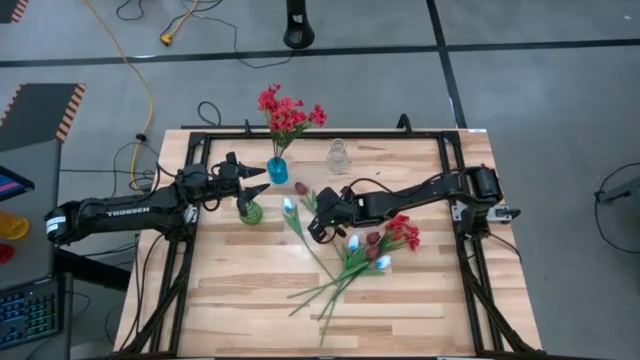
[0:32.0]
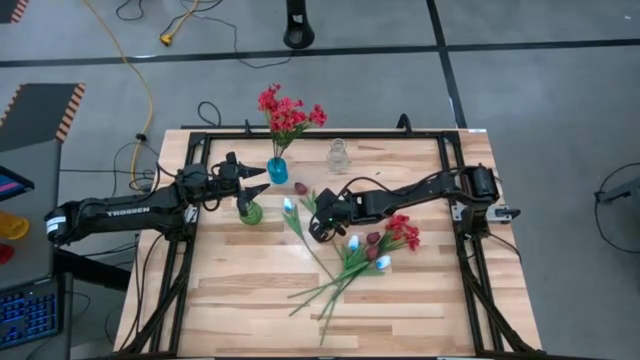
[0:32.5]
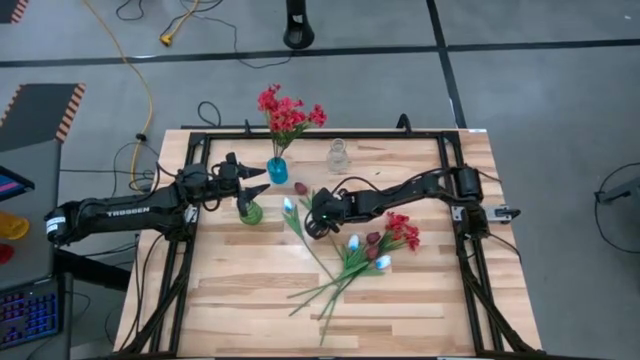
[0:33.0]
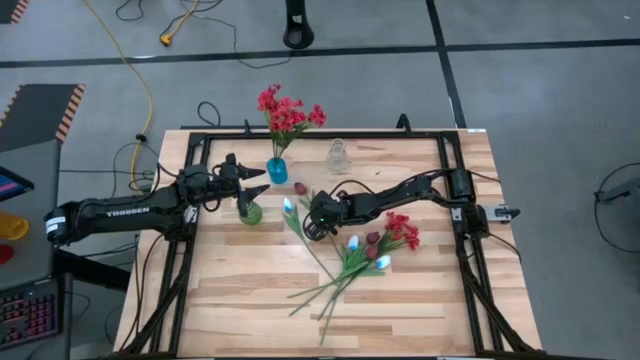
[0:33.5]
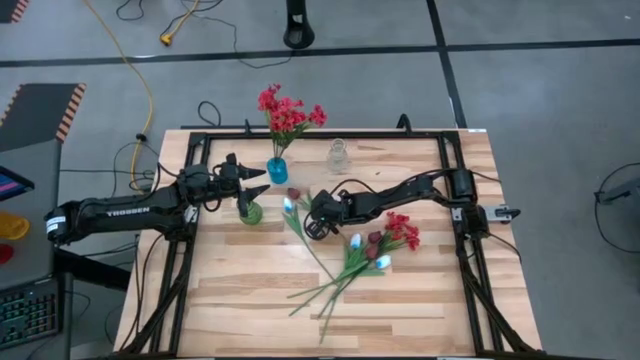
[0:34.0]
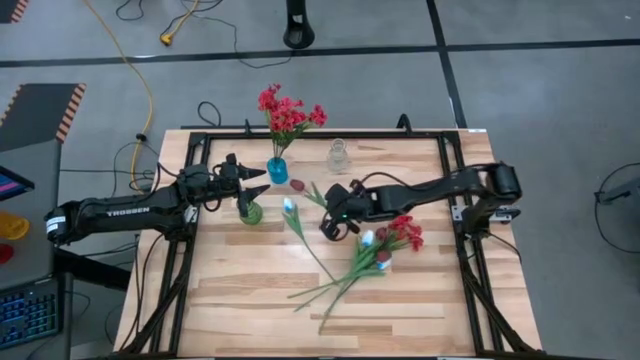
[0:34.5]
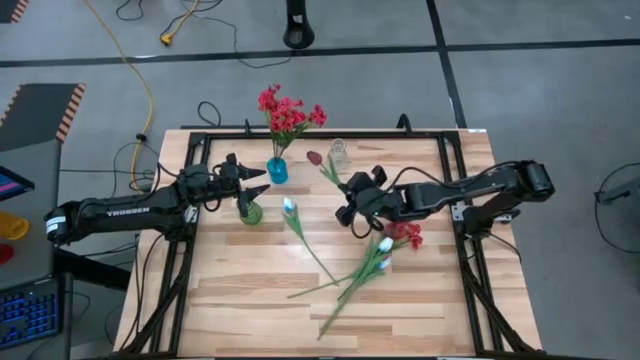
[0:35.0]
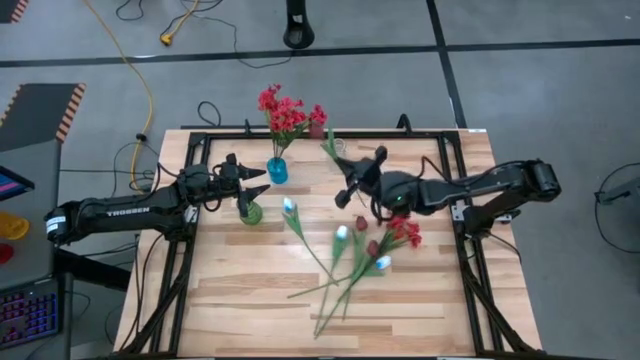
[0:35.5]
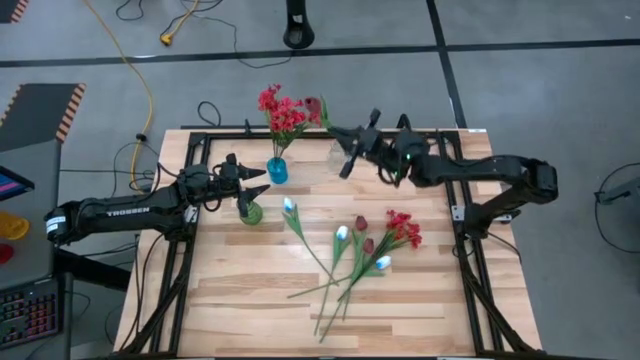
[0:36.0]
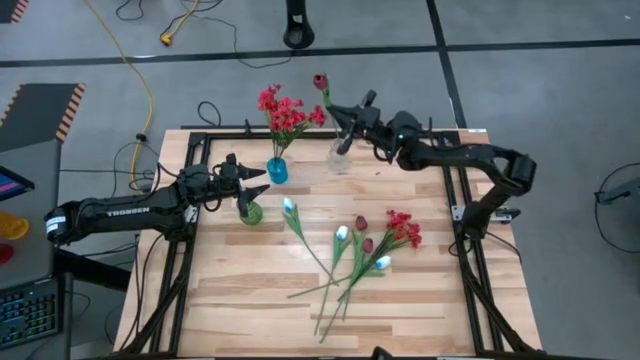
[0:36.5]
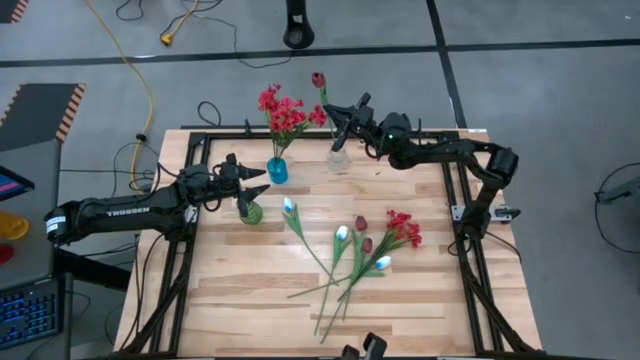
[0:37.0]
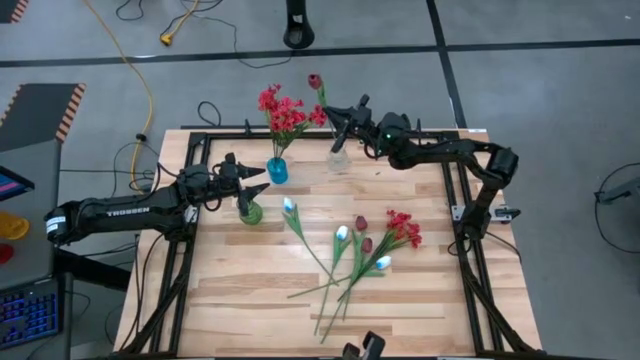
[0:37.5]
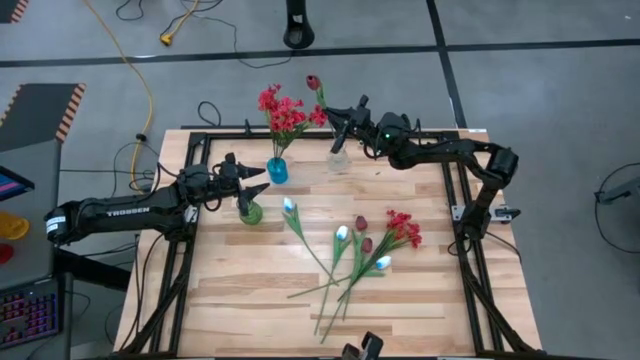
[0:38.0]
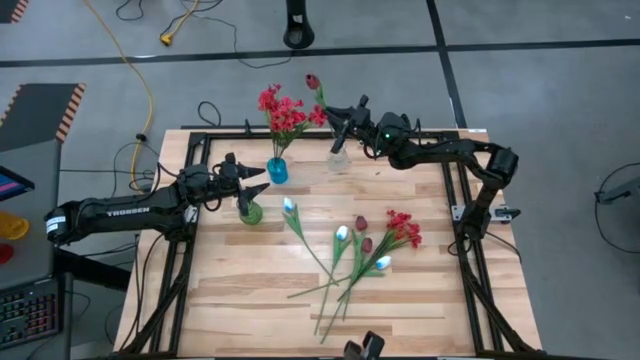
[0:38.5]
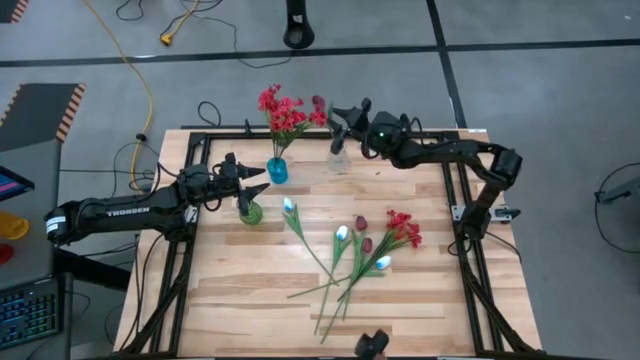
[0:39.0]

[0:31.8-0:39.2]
Task: Sort flowers into vase by color
Put the top red tulip into the transparent vase

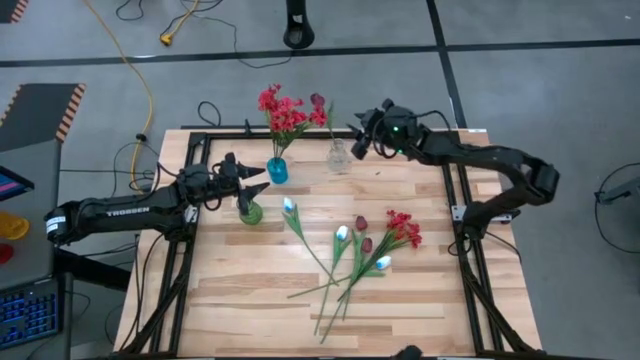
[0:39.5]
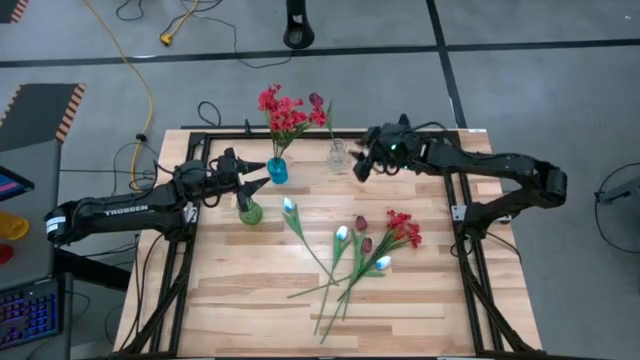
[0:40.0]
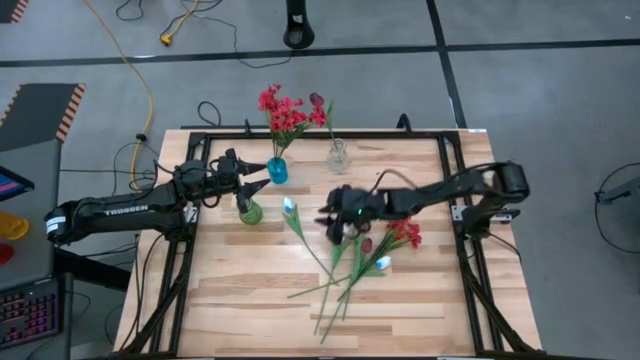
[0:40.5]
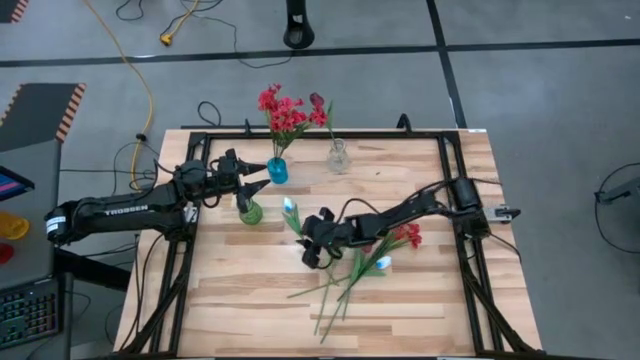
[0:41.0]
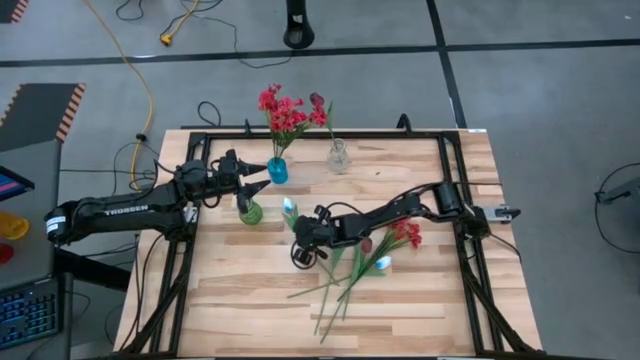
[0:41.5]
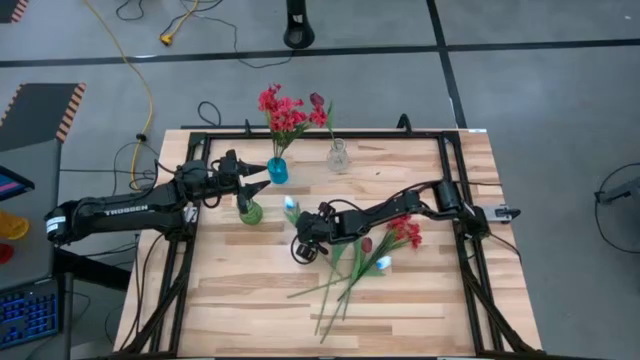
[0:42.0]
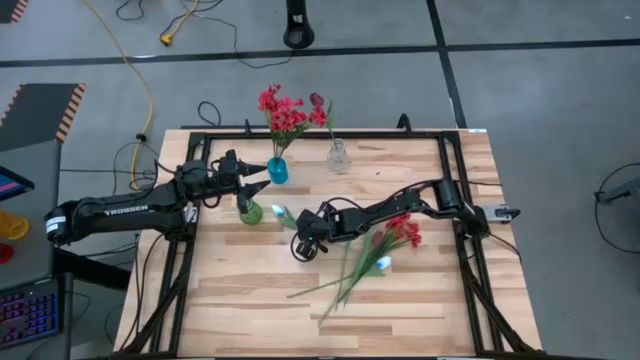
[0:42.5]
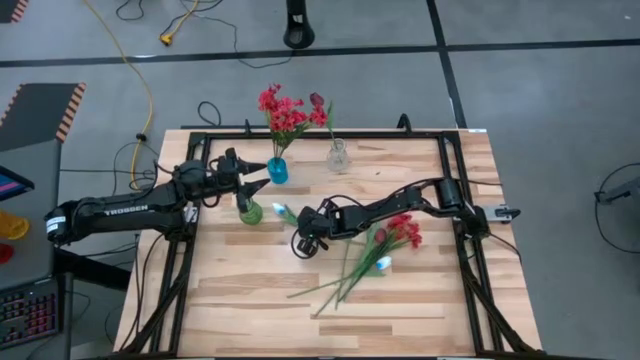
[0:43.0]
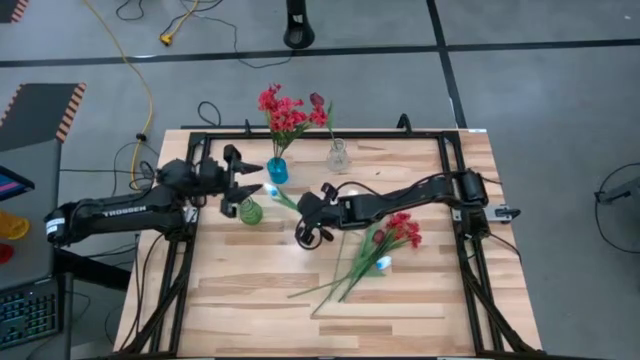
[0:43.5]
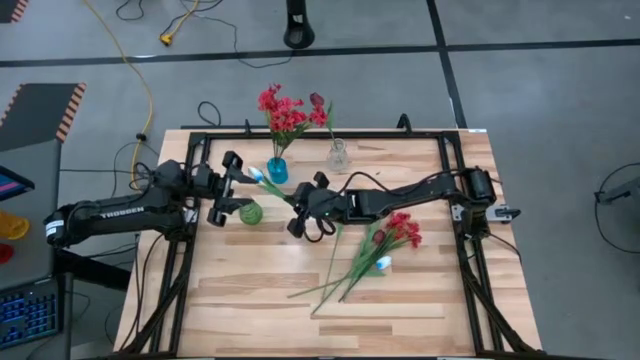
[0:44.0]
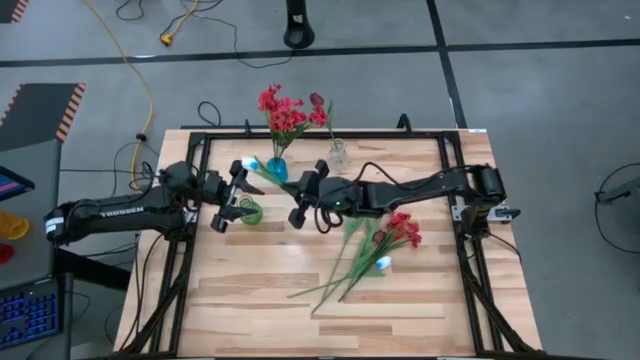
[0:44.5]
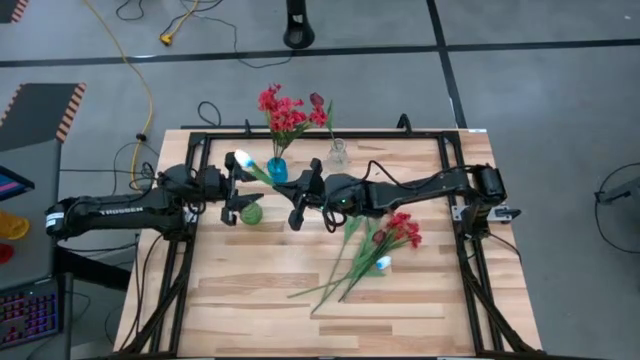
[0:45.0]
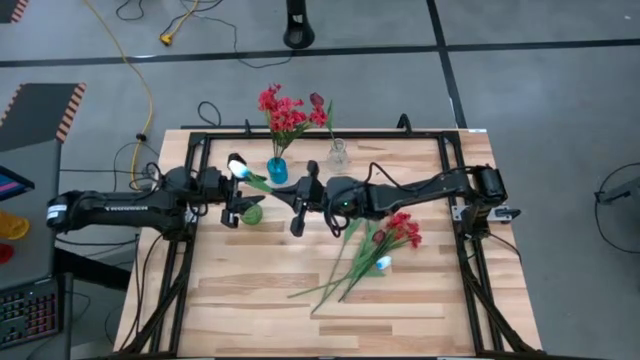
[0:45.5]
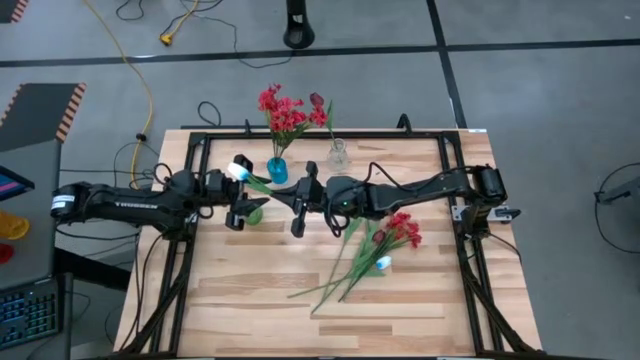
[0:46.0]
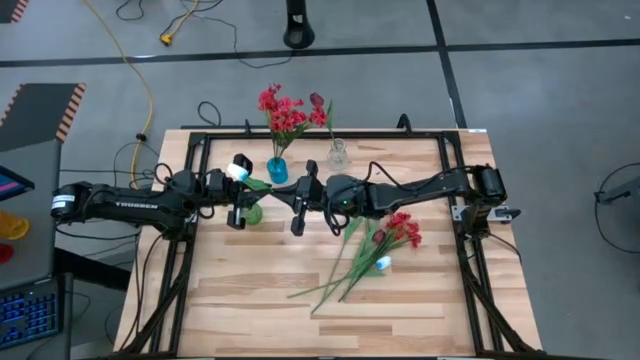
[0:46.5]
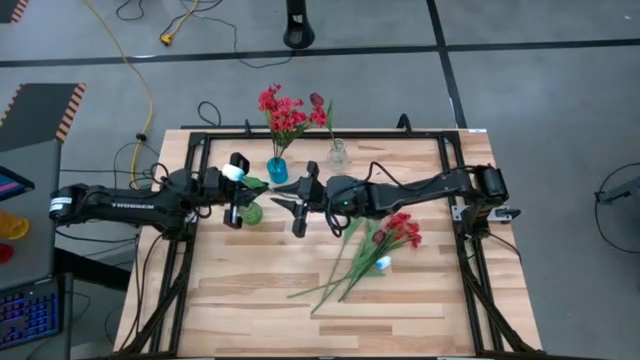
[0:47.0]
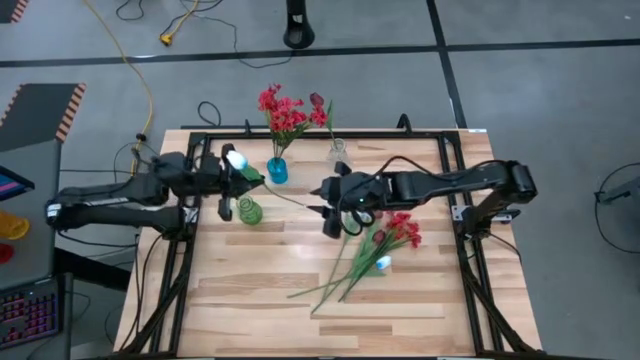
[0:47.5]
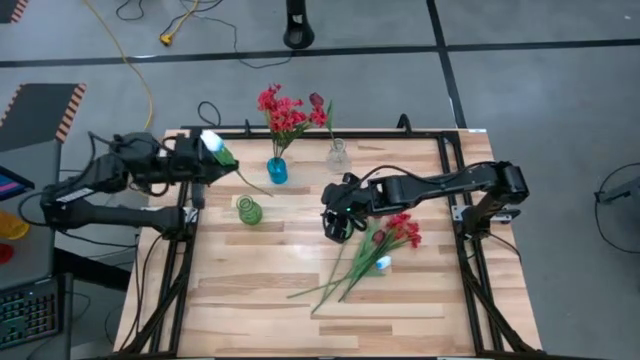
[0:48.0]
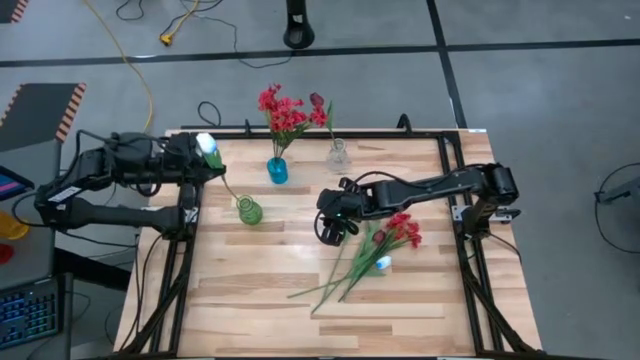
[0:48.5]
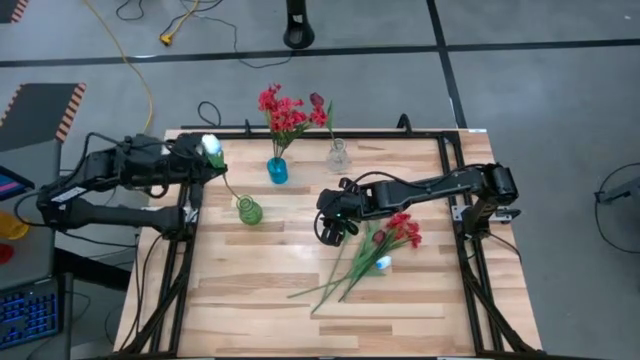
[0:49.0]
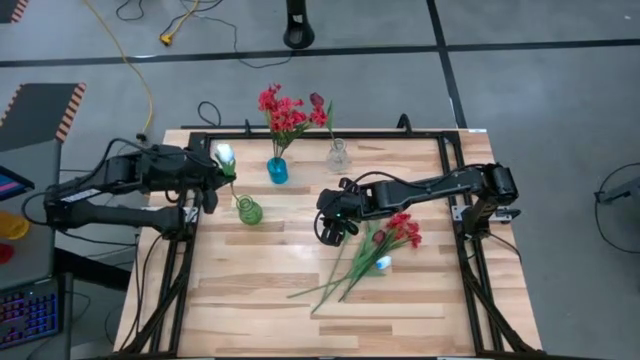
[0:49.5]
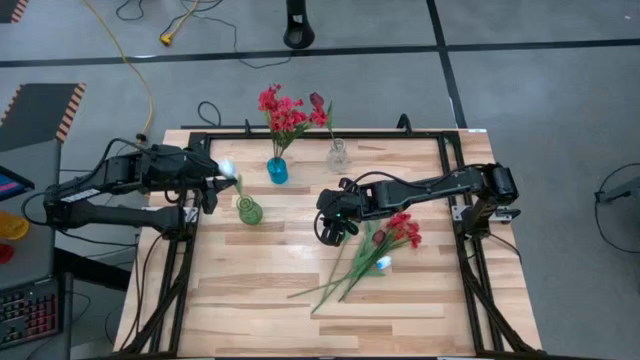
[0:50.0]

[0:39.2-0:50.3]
Put the top white tulip into the green vase

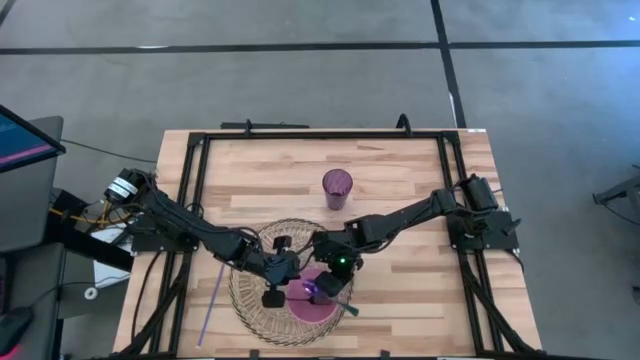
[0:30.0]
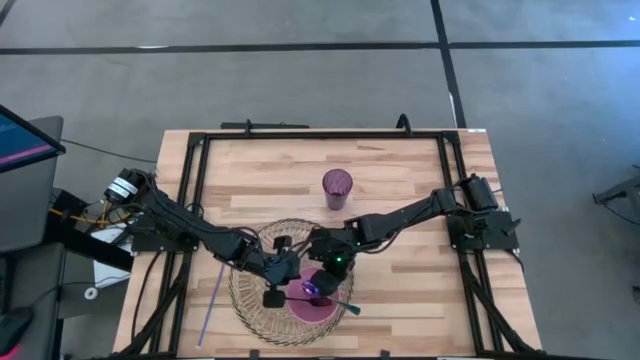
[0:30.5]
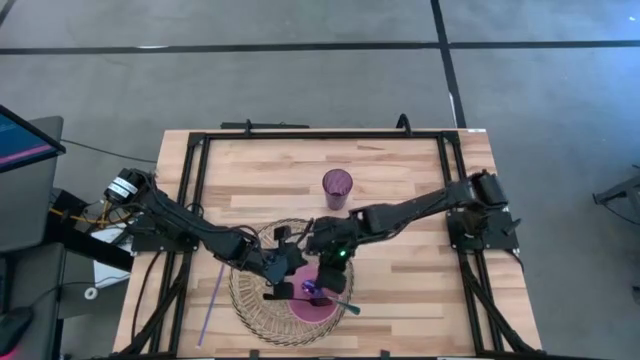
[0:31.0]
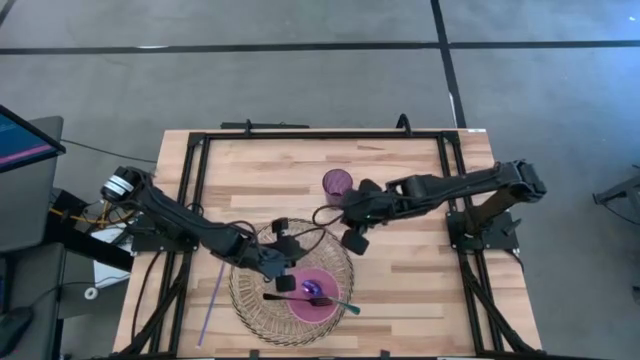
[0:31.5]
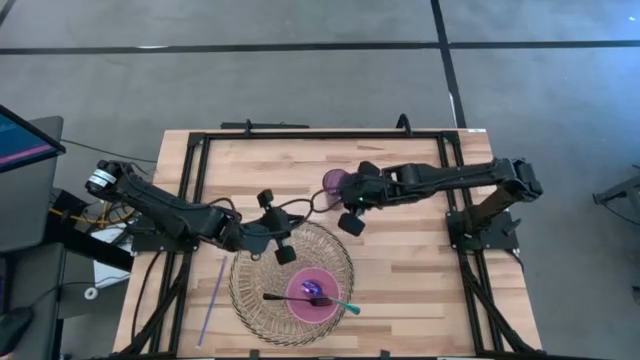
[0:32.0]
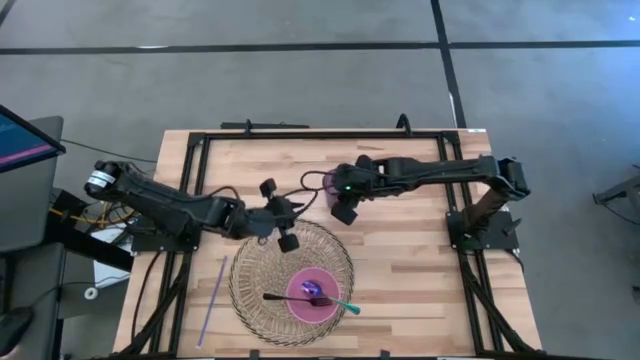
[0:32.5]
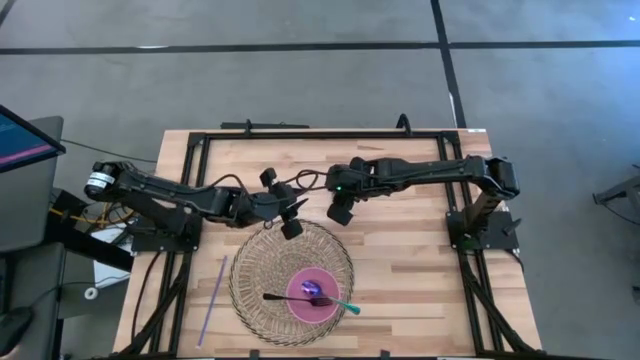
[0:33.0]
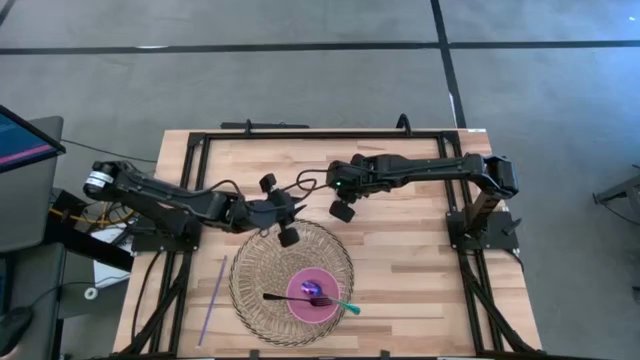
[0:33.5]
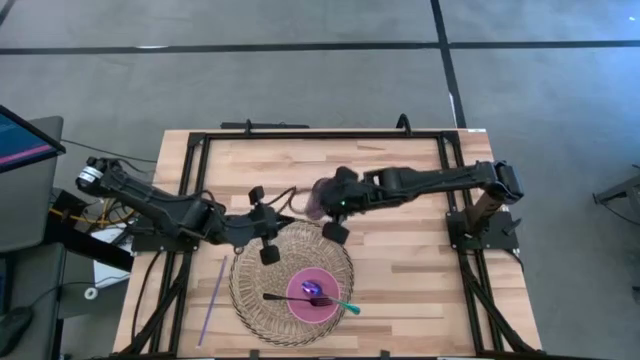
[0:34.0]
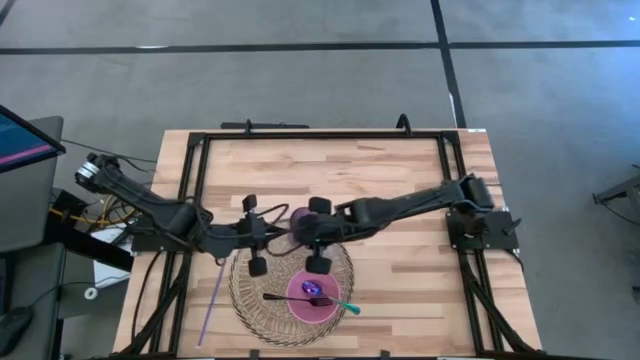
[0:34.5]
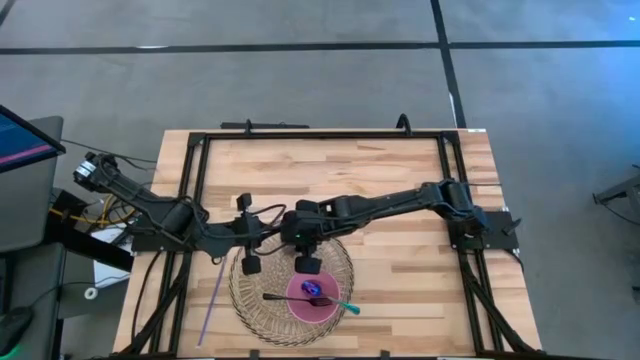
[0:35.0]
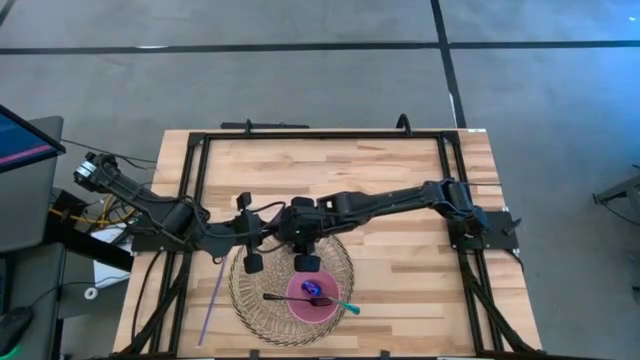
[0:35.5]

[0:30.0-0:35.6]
Task: Pick & Place Utensil
Put the purple cup on the brown mat
